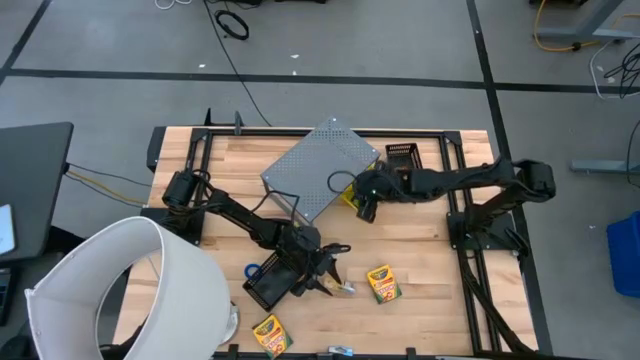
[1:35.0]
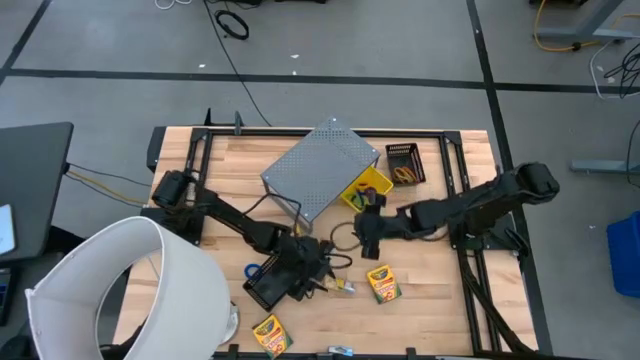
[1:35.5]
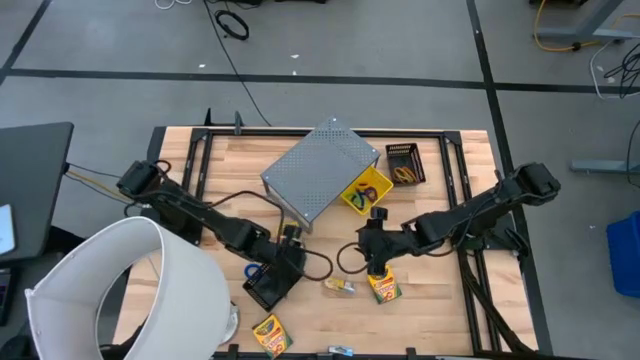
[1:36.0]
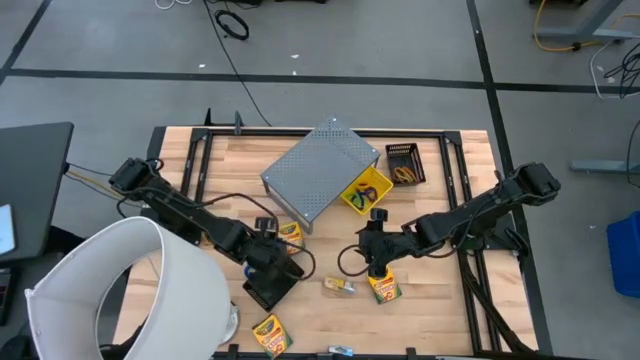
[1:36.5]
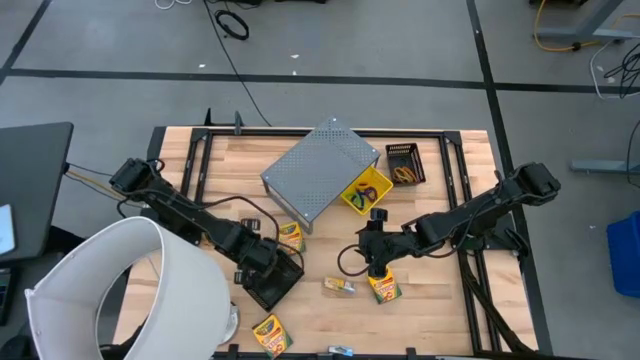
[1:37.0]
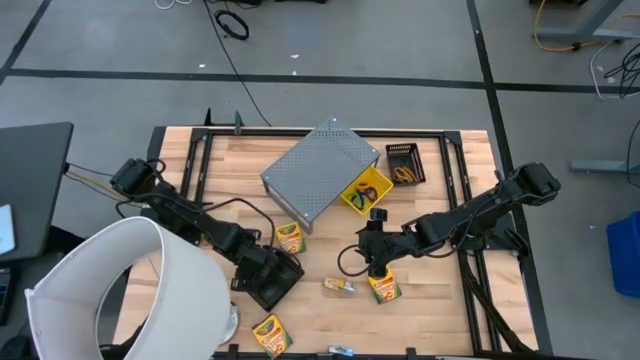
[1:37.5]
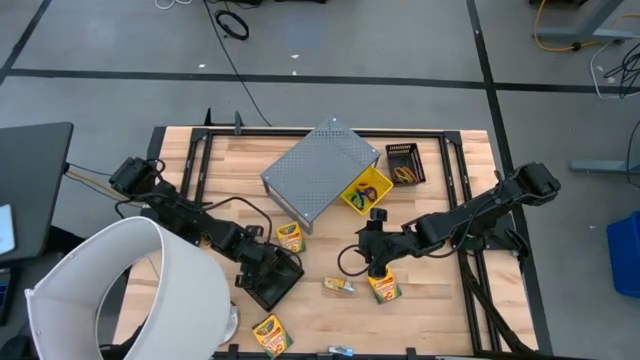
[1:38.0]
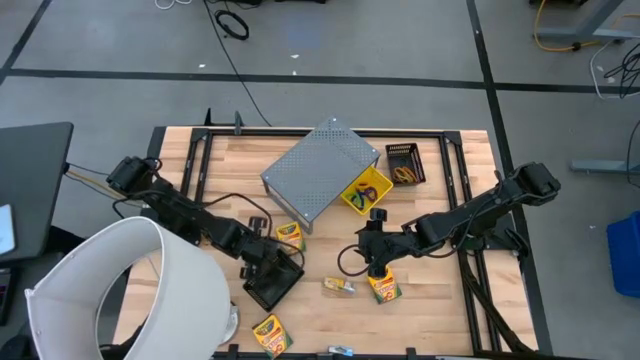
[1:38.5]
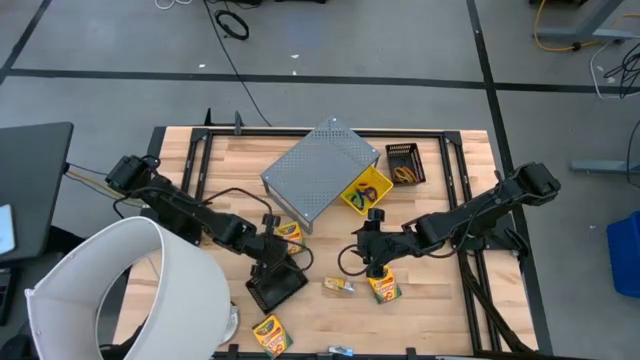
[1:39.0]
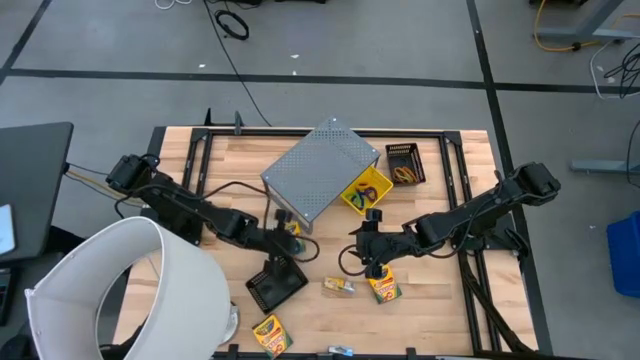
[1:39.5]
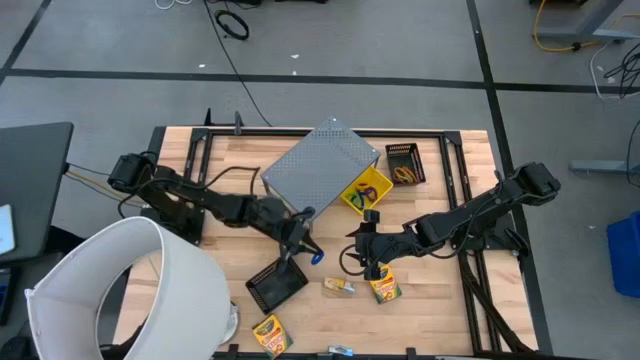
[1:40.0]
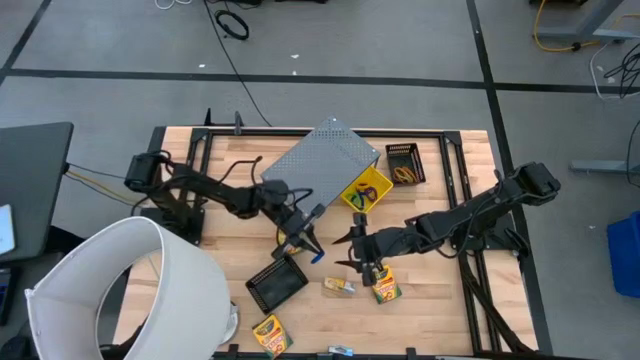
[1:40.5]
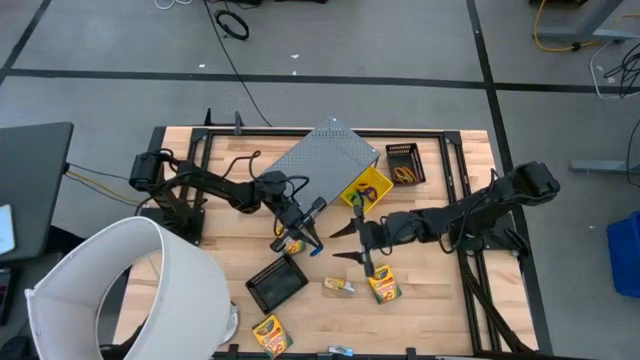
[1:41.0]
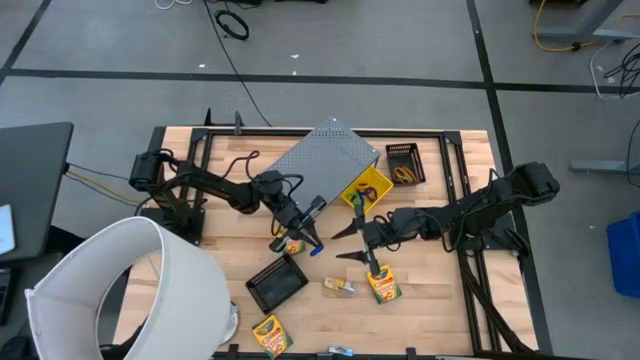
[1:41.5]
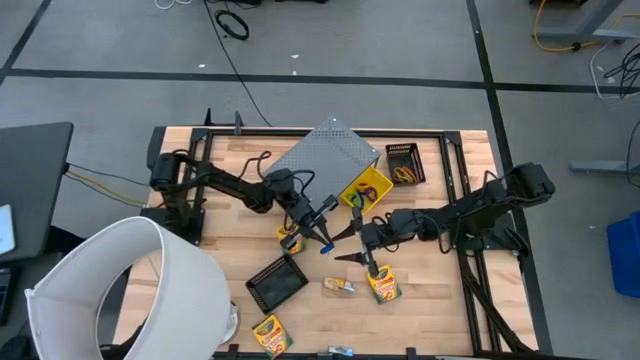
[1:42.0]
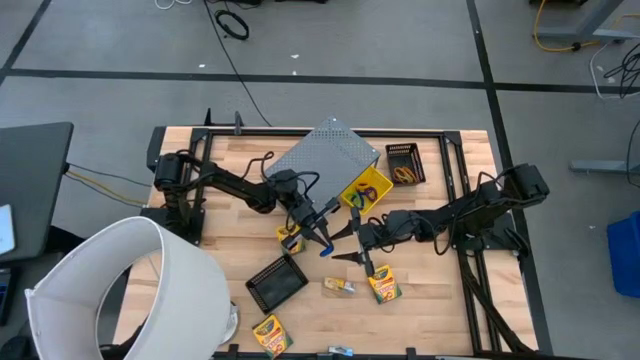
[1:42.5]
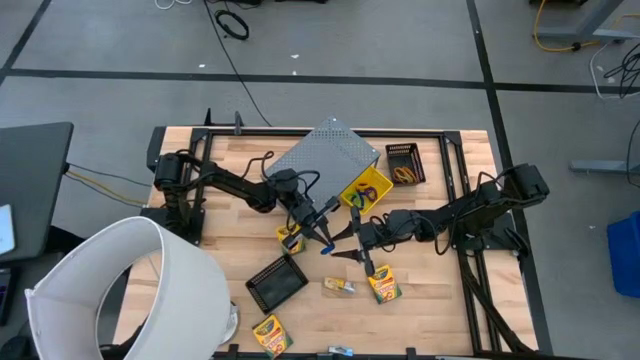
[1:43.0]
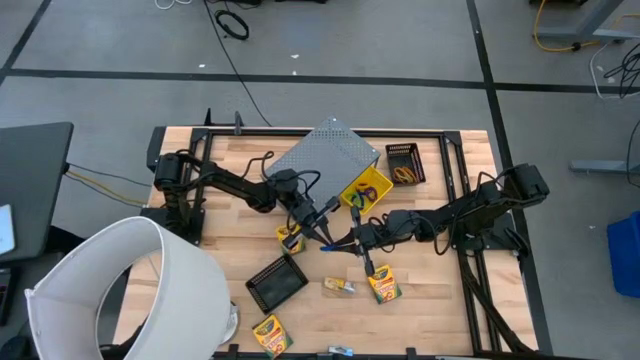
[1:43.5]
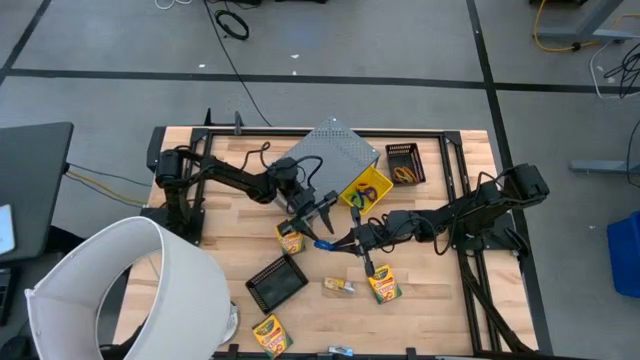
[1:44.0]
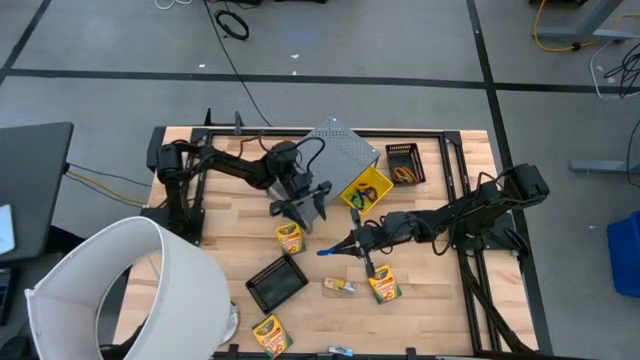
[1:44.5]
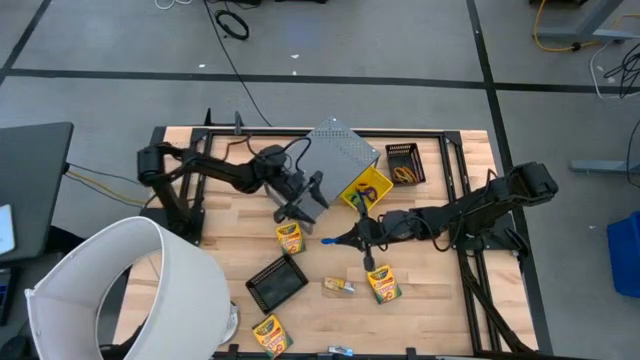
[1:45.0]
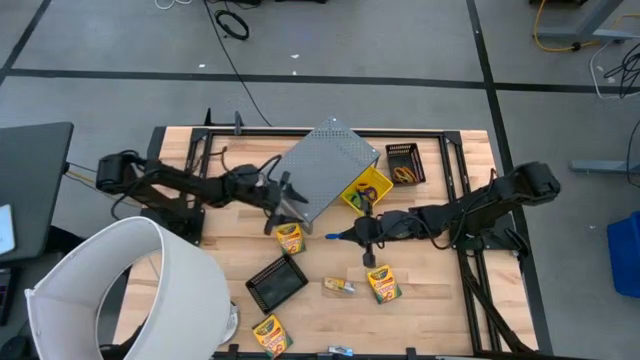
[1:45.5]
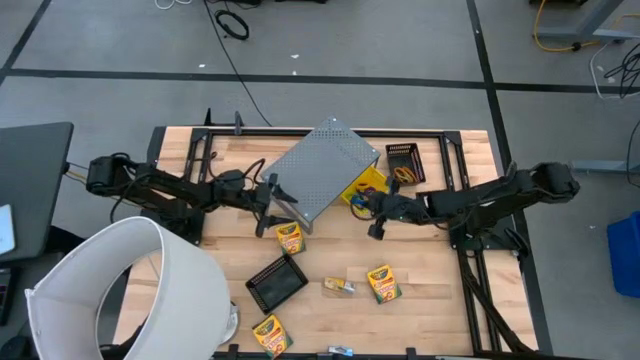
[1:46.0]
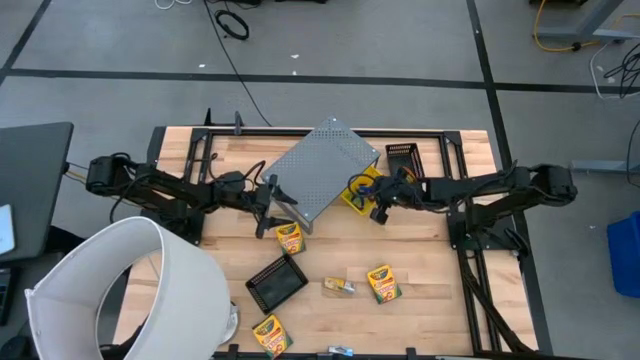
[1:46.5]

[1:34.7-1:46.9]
Task: Pick & Place Office Desk Supplies
Put the blue spring keychain into the yellow bin

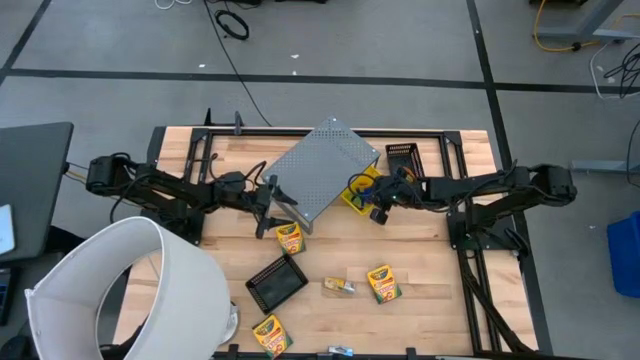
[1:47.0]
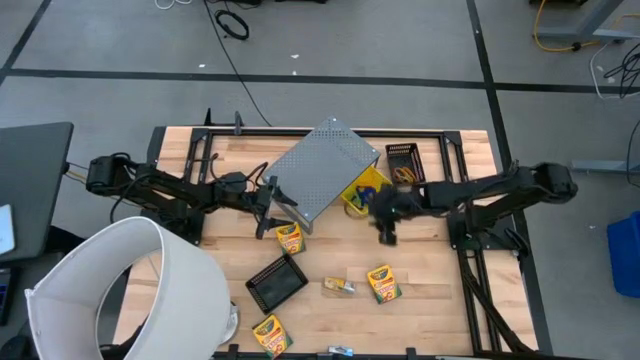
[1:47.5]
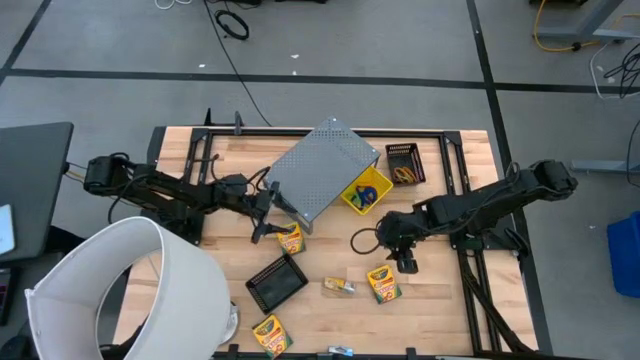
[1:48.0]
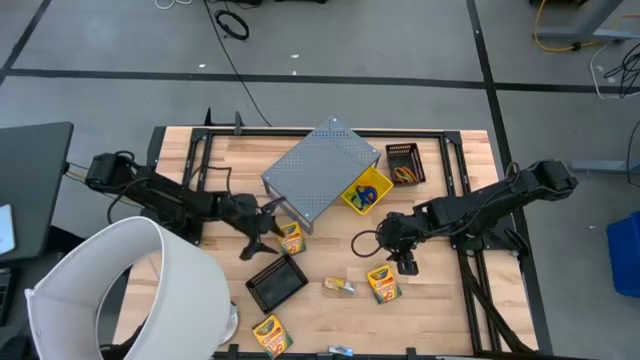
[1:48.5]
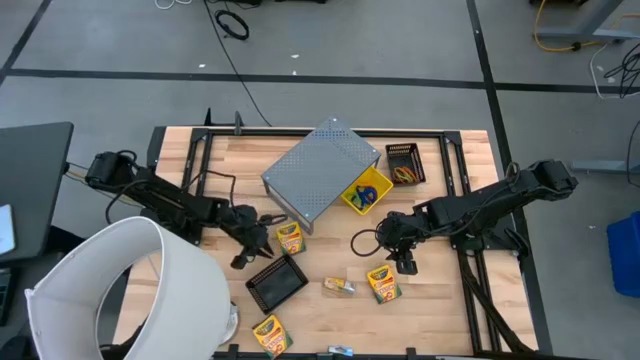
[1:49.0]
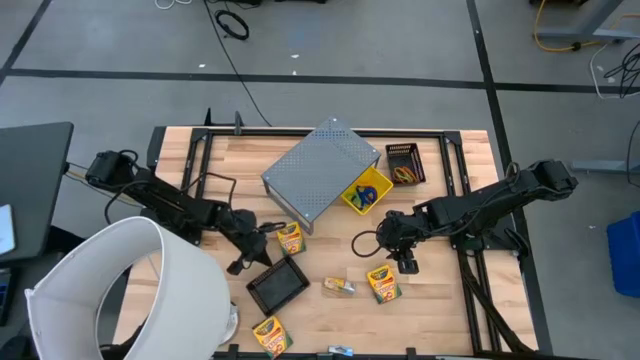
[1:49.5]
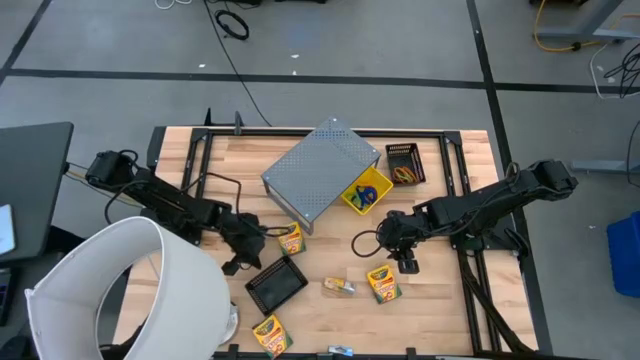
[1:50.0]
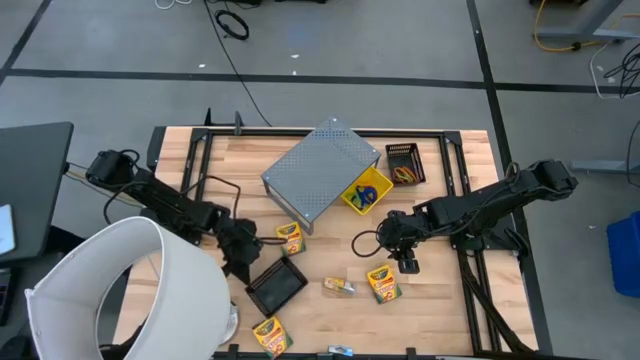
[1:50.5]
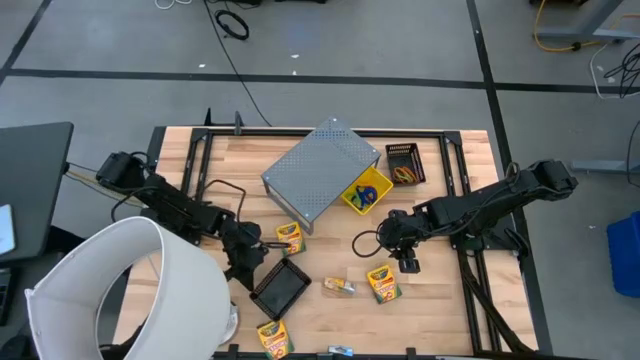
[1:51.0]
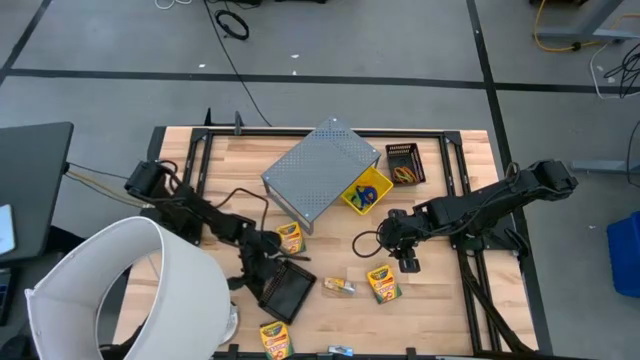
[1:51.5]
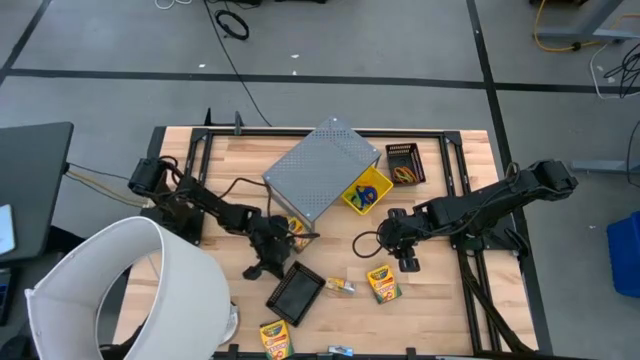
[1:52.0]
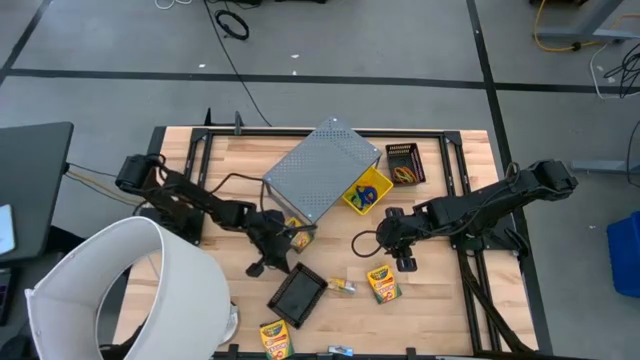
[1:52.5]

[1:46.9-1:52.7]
Adjust the bottom black bin

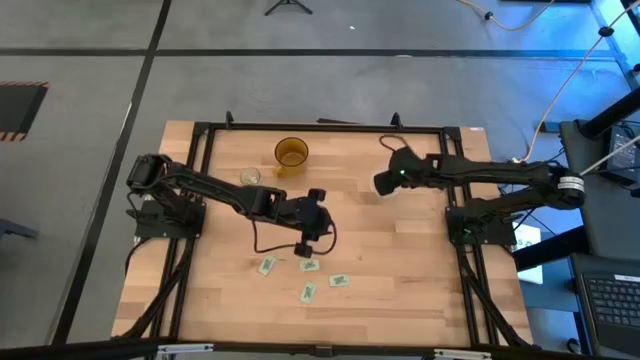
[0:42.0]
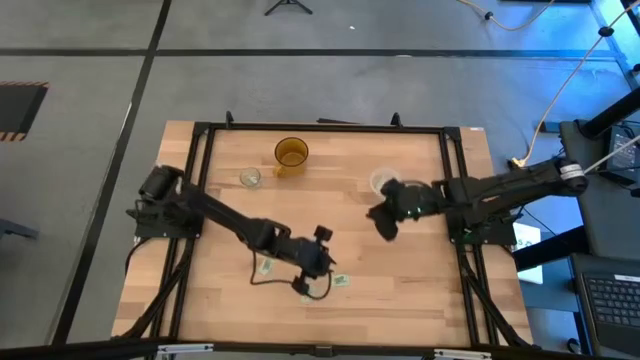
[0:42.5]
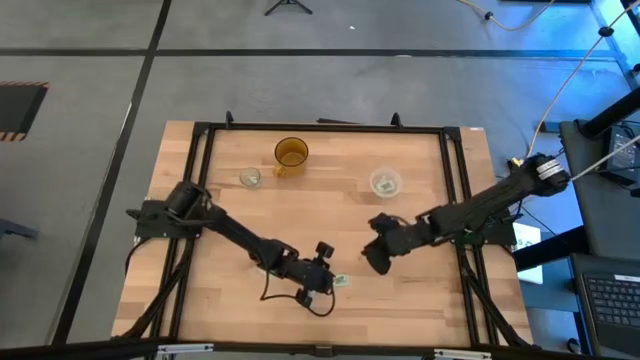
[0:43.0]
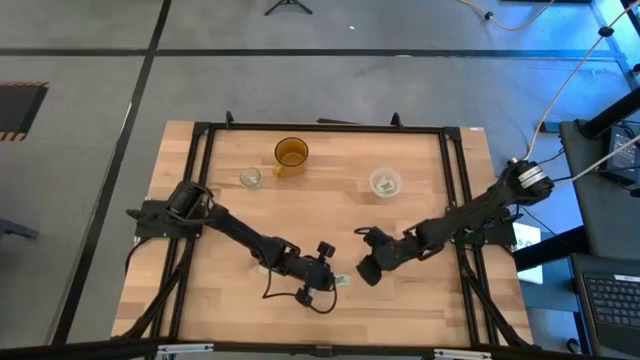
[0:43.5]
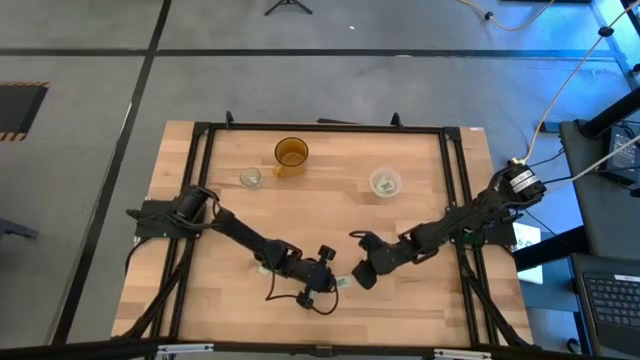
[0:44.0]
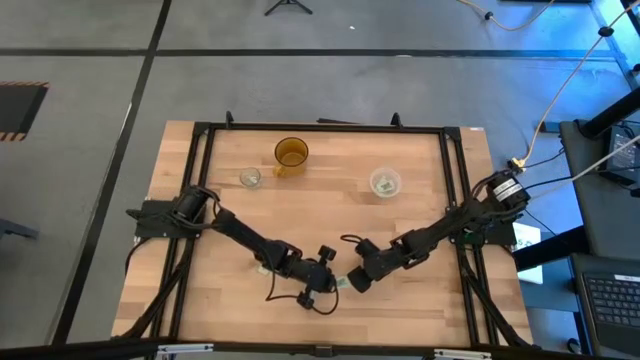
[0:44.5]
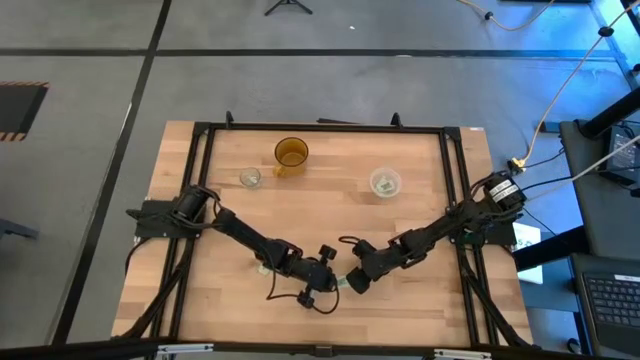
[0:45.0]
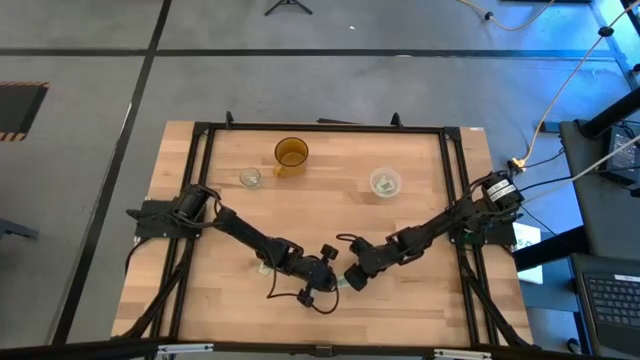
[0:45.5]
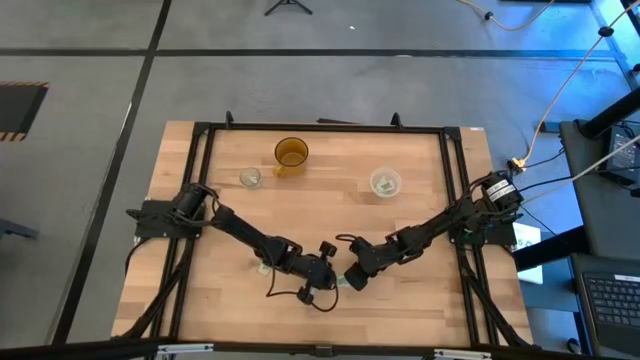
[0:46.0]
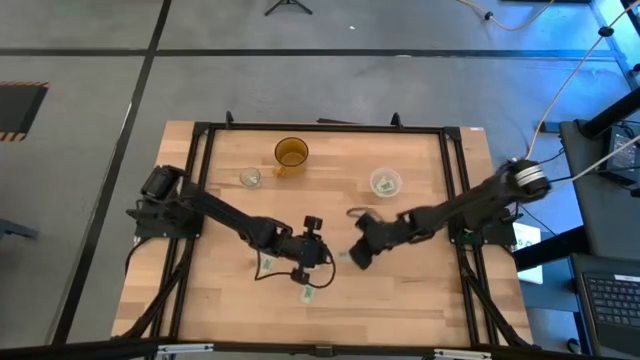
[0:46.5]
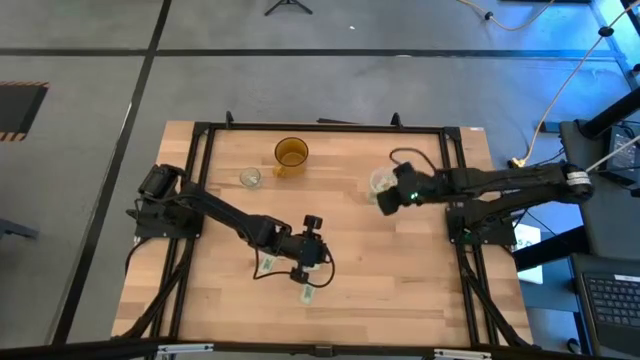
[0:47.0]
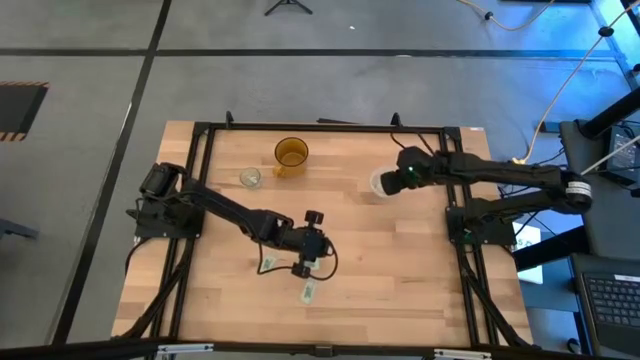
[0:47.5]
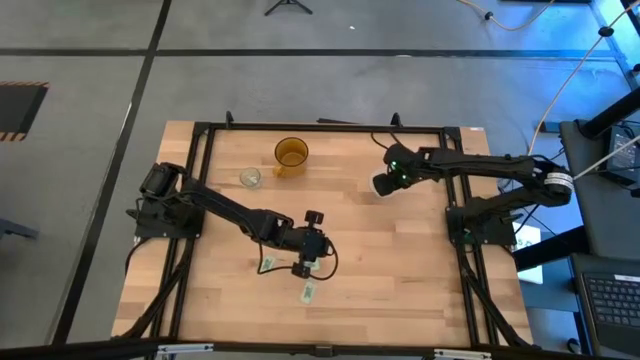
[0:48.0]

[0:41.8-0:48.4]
Task: Pick and place Stevia / Truvia into bins
Put the stevia packet into the transparent container
